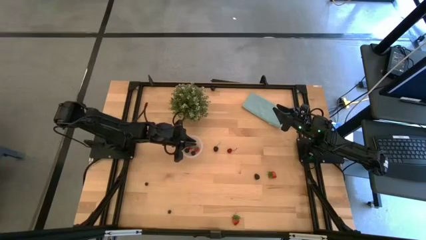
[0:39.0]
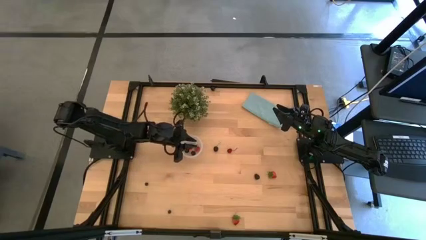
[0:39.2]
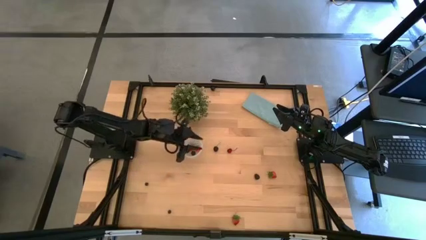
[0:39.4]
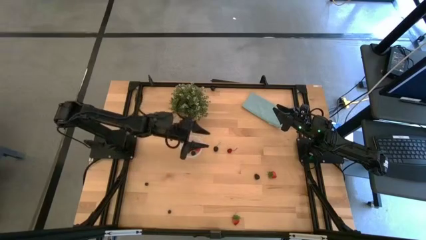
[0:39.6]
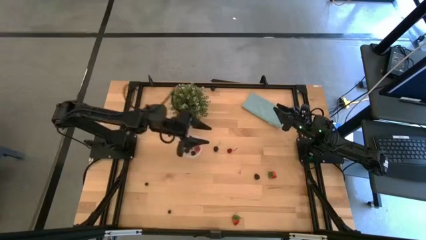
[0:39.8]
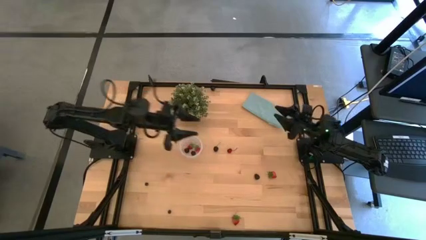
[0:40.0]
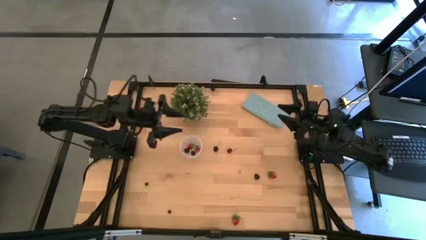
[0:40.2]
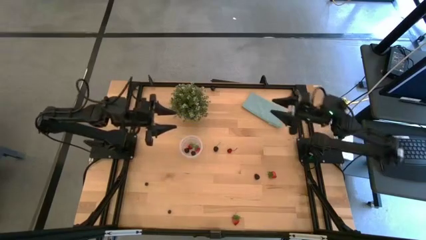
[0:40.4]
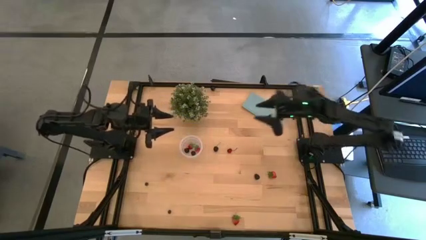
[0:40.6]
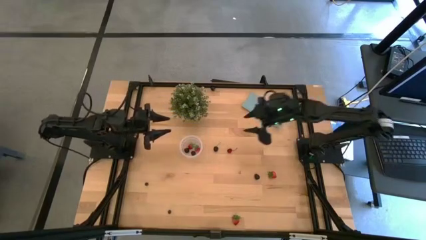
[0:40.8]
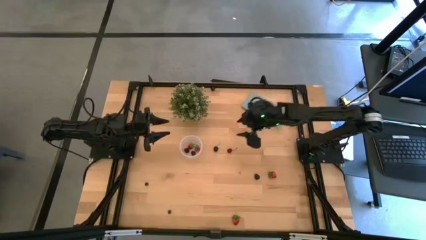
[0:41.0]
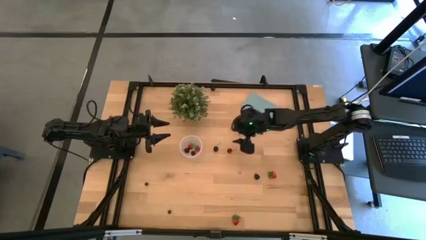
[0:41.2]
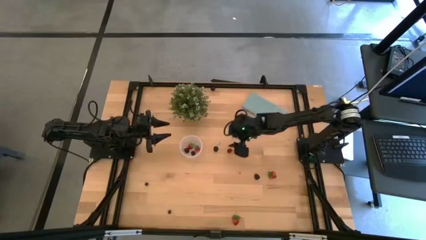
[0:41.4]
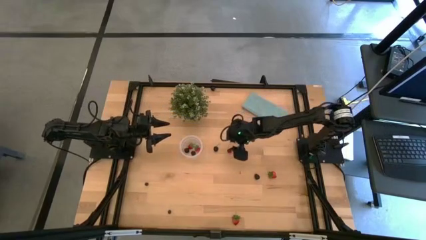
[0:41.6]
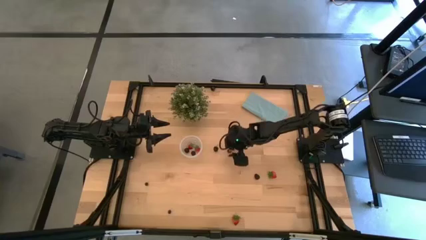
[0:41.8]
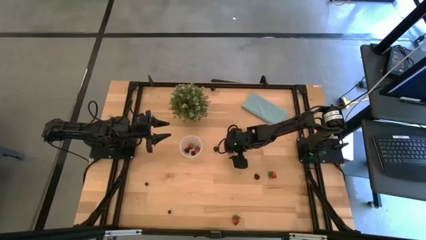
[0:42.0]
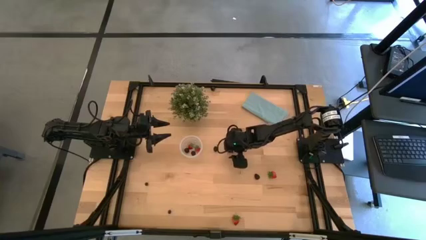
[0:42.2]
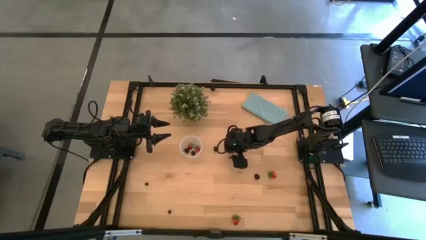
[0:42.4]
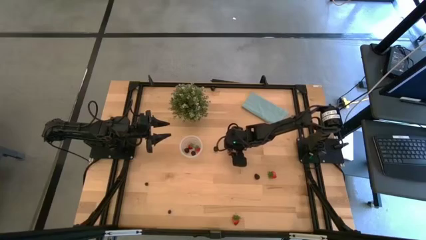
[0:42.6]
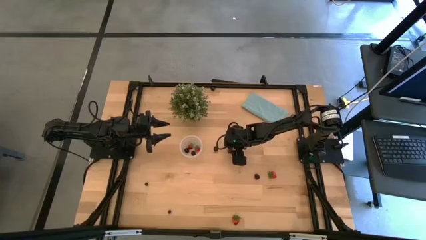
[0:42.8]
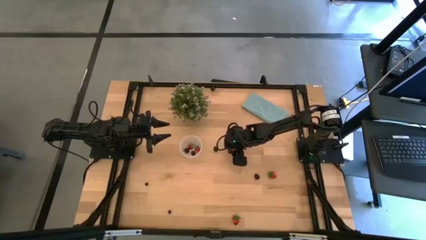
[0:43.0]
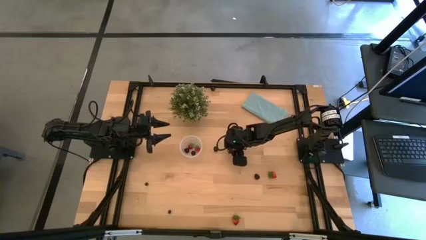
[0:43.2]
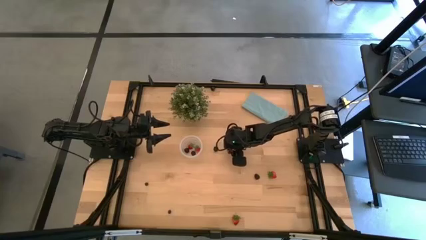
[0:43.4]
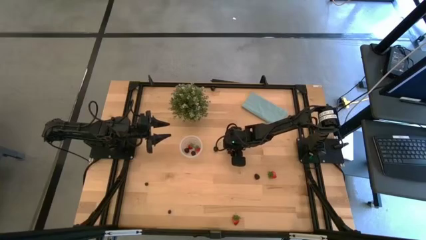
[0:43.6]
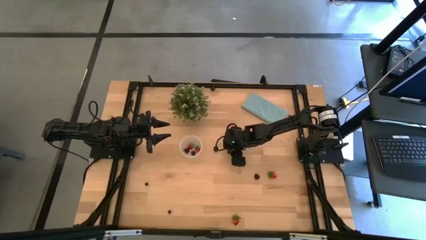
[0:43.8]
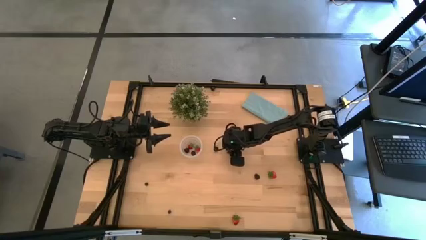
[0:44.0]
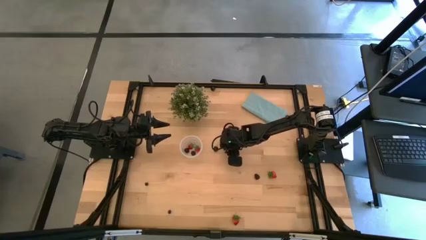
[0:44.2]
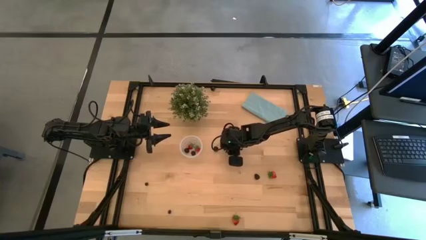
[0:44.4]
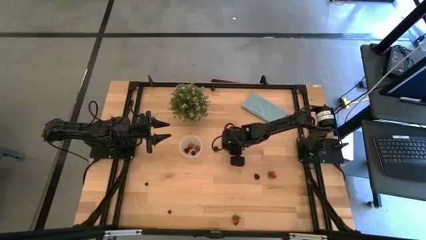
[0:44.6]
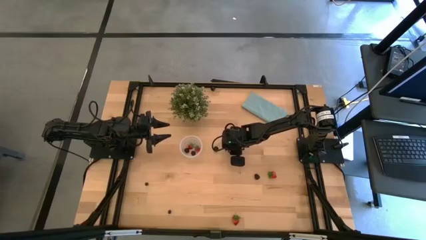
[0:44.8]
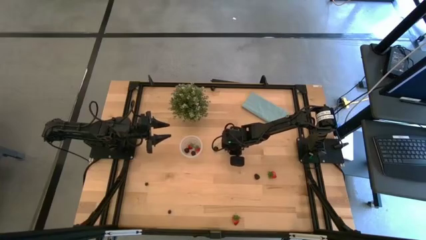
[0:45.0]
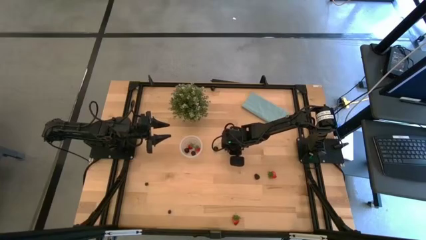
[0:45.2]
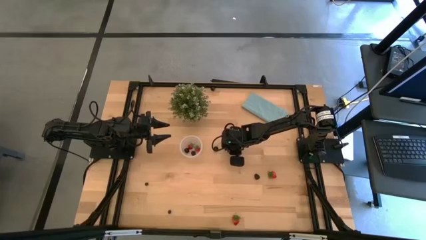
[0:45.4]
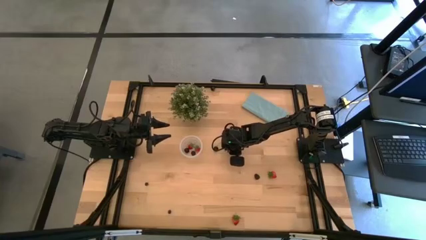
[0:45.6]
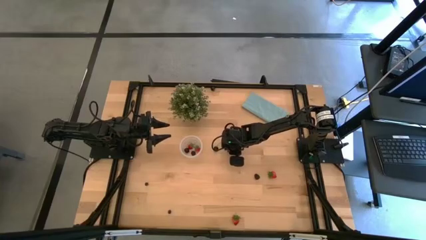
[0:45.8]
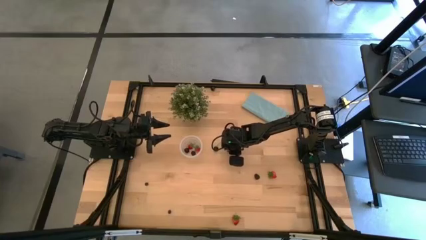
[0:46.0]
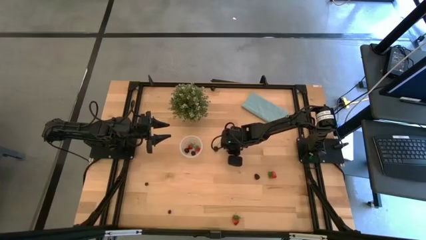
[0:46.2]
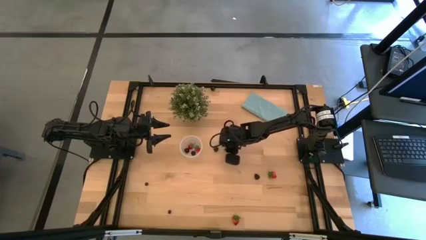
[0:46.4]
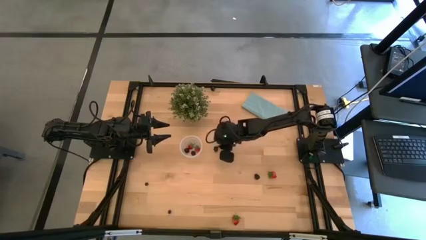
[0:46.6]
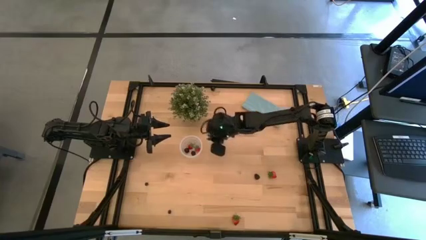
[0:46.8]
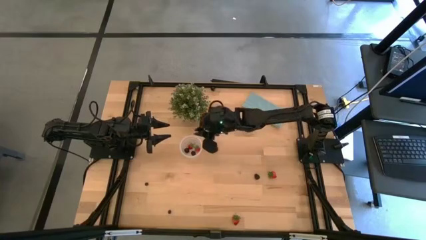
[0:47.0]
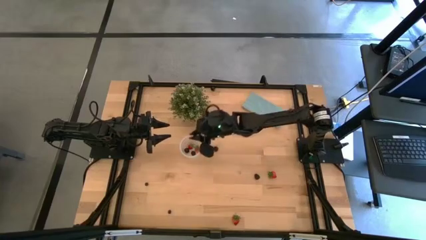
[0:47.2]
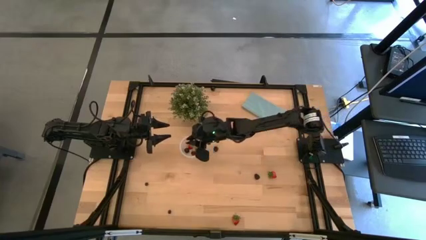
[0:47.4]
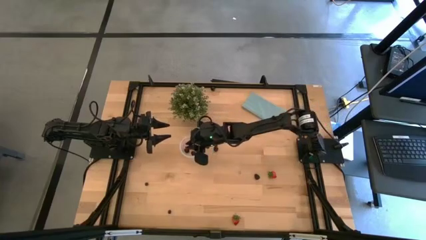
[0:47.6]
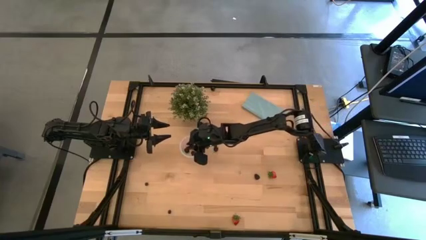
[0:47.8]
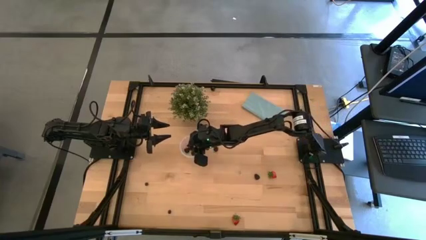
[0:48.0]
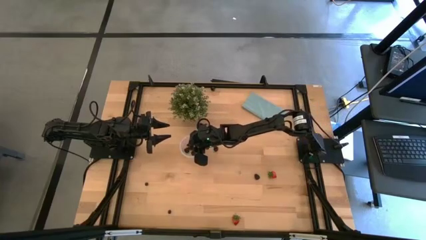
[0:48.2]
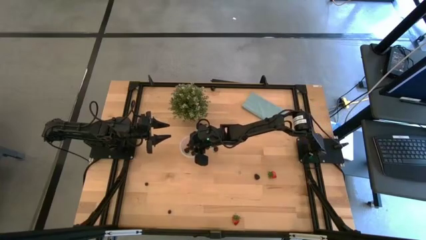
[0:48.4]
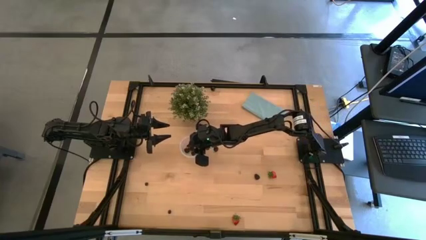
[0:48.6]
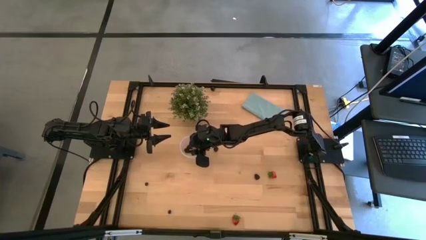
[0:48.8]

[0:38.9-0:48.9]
Task: Pick and placing Produce into tupperware
Put the red cherry into the transparent container

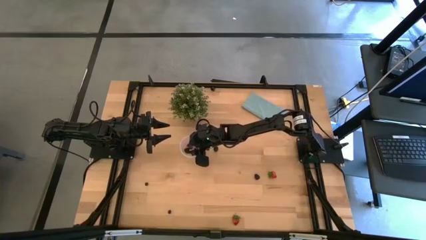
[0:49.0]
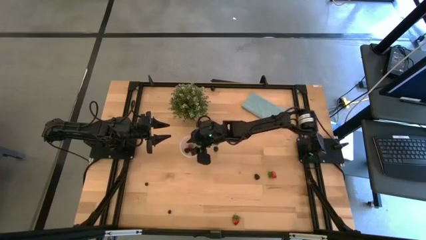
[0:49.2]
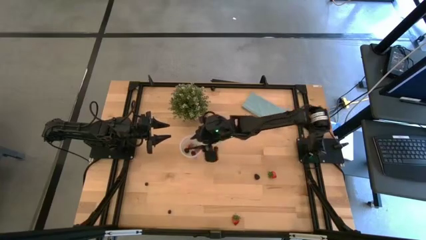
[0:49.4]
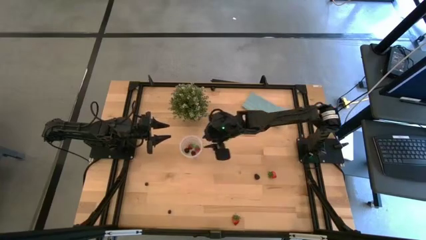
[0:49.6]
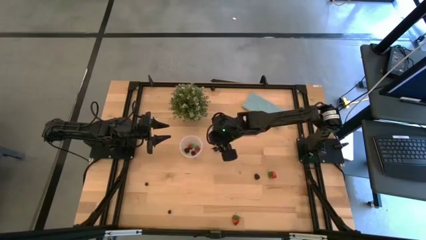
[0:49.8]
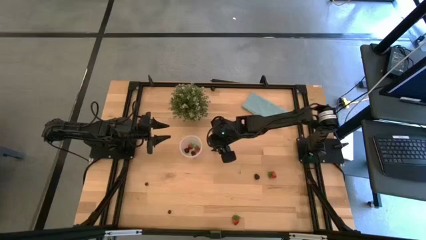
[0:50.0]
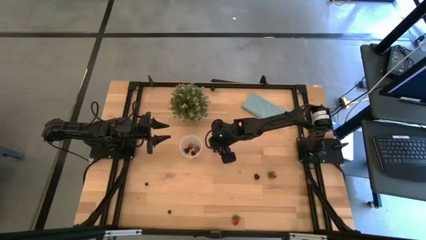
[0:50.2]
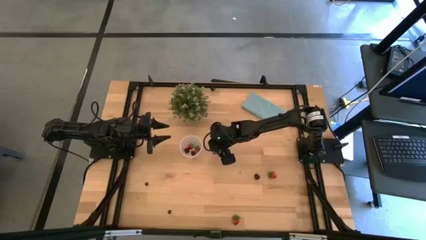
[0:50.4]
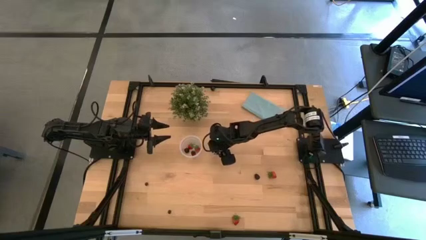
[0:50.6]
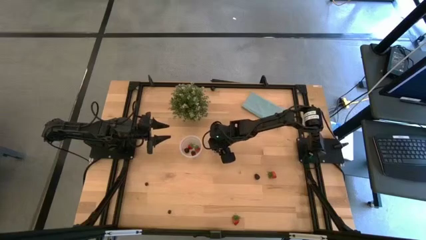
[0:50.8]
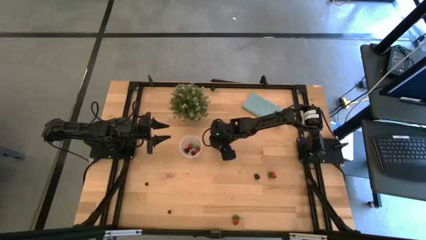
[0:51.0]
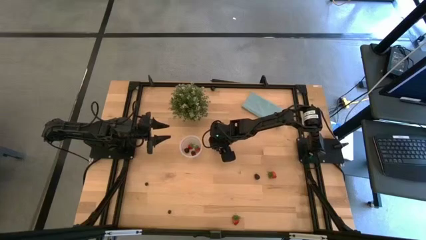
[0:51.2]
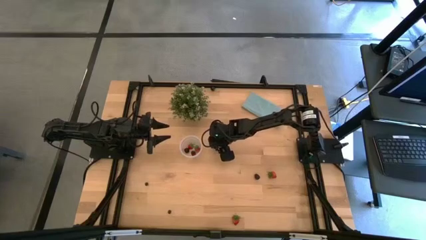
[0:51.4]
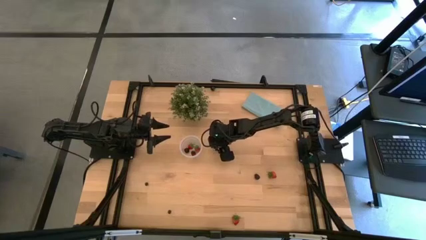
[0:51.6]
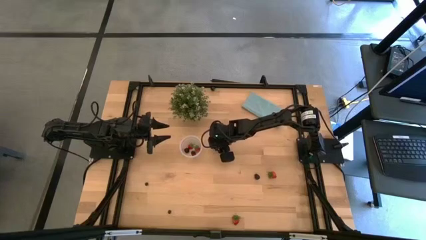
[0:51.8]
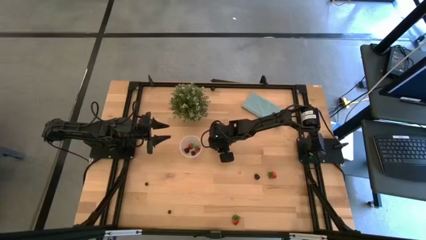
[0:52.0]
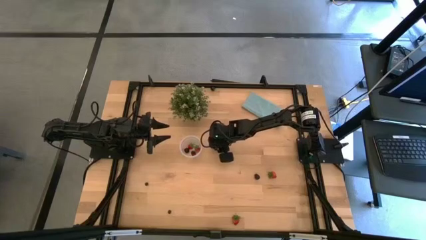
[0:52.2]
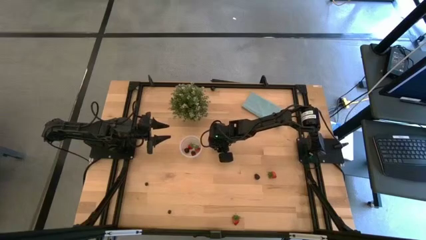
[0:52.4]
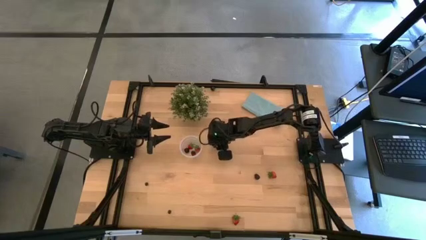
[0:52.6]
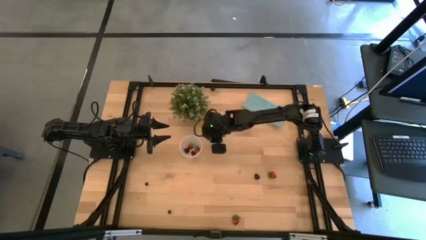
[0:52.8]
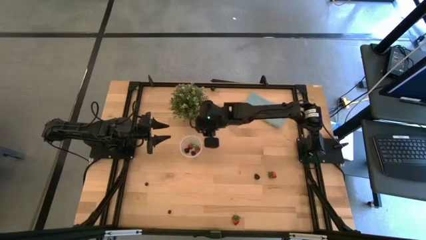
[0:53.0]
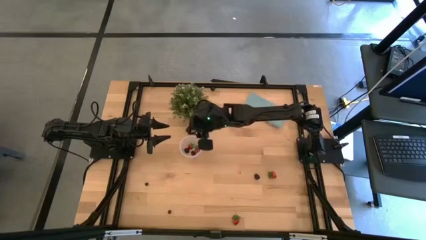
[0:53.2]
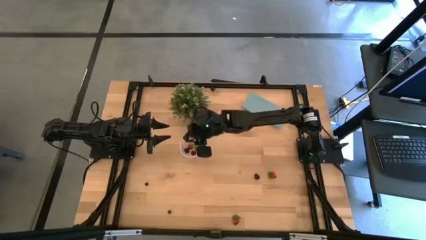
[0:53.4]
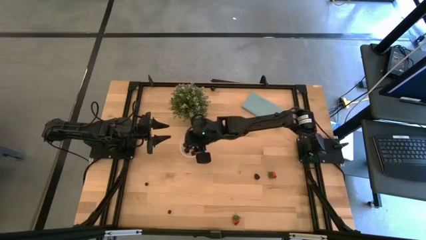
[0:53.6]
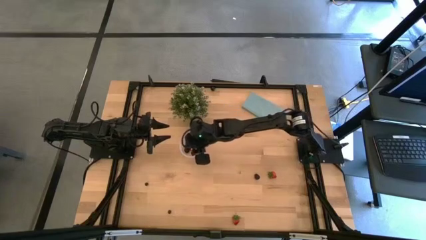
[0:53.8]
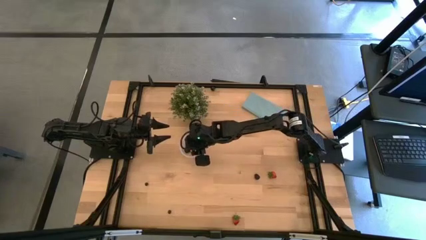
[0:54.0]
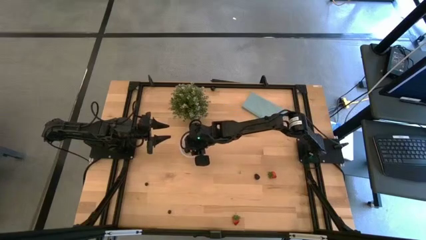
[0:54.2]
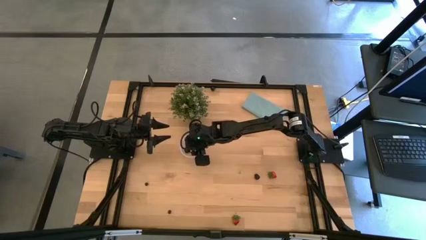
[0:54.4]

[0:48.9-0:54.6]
Put the black cherry into the transparent container
